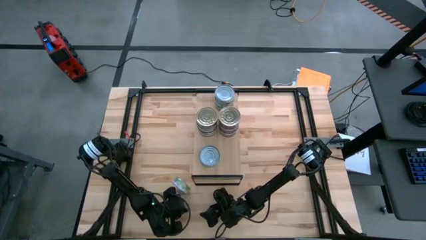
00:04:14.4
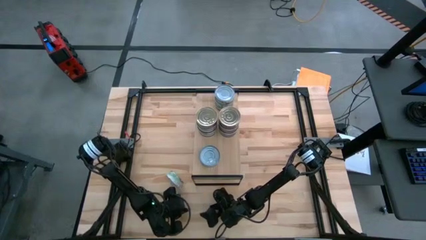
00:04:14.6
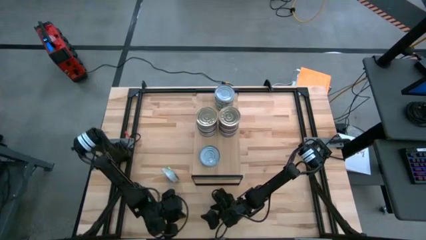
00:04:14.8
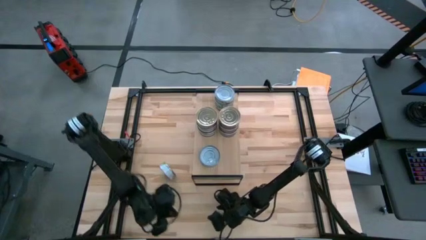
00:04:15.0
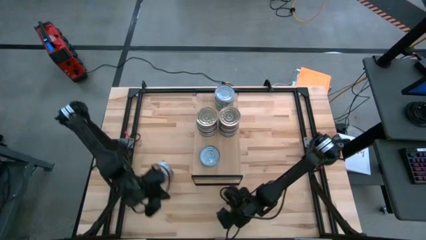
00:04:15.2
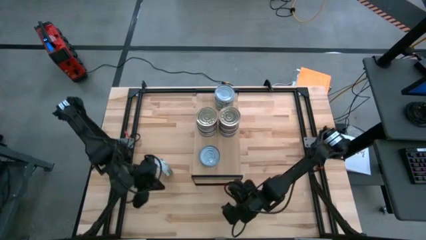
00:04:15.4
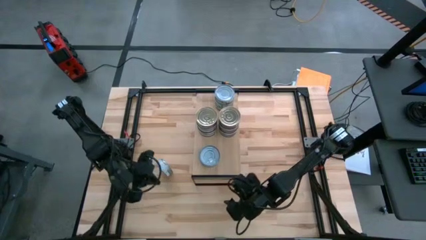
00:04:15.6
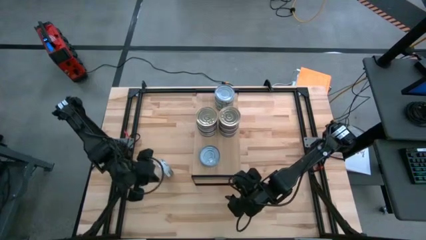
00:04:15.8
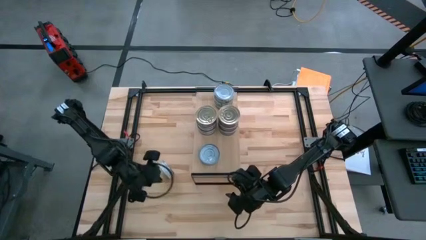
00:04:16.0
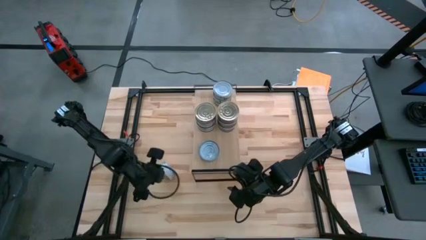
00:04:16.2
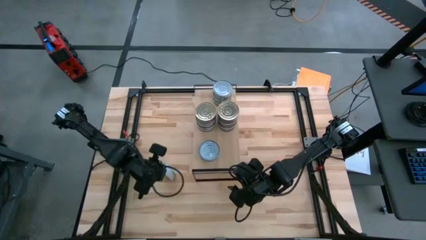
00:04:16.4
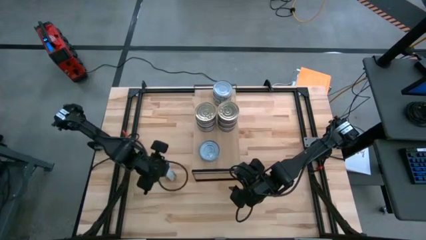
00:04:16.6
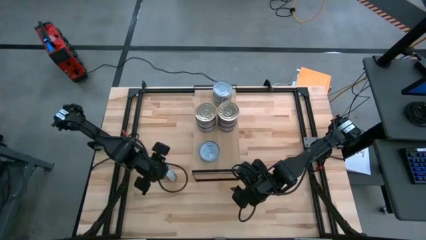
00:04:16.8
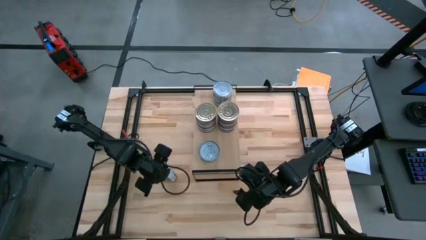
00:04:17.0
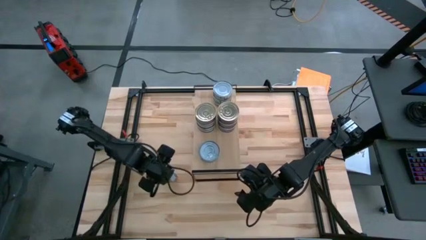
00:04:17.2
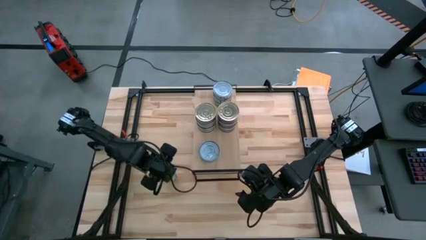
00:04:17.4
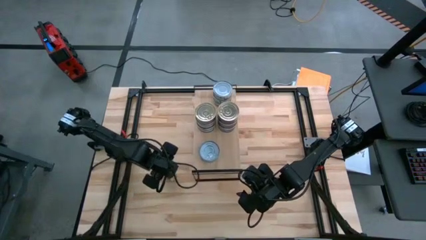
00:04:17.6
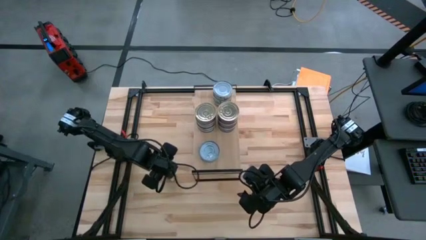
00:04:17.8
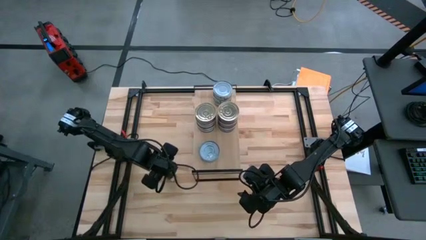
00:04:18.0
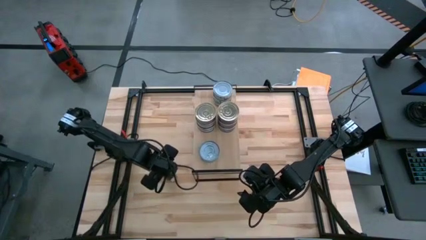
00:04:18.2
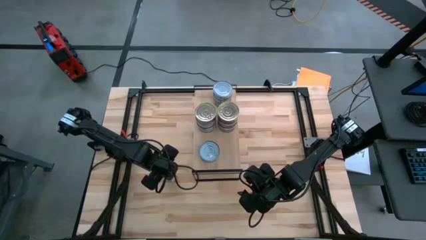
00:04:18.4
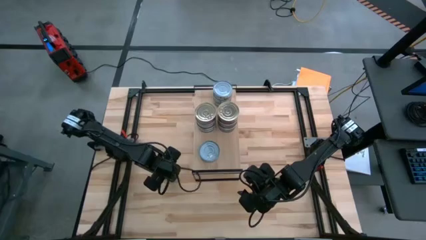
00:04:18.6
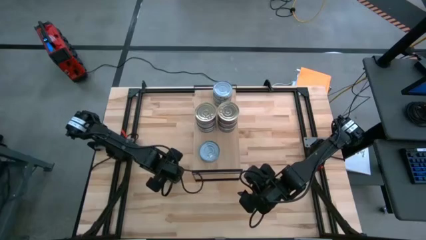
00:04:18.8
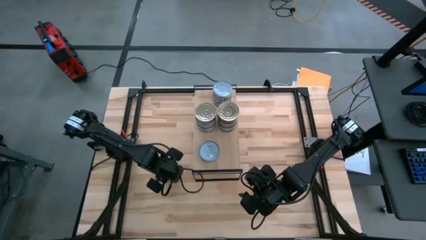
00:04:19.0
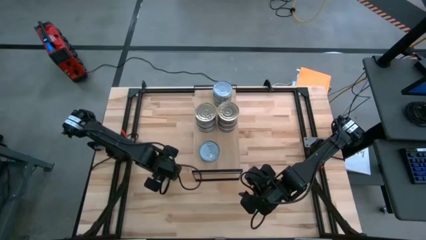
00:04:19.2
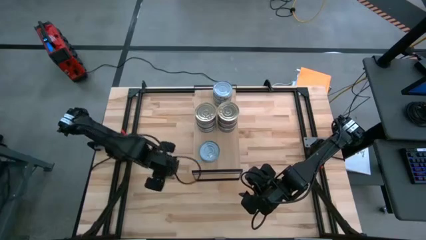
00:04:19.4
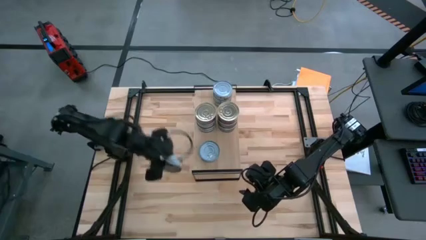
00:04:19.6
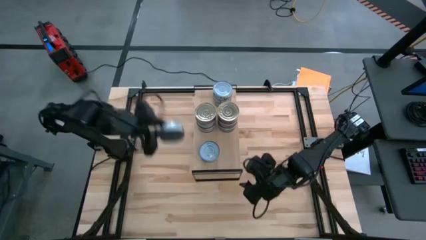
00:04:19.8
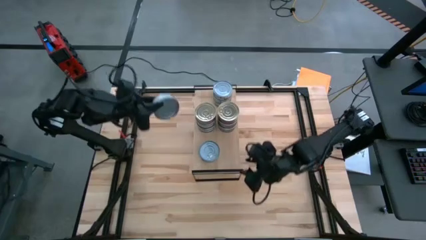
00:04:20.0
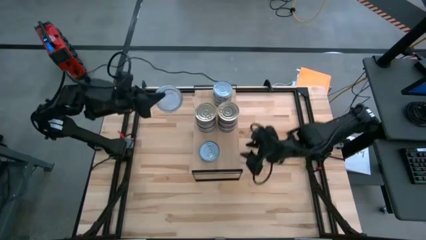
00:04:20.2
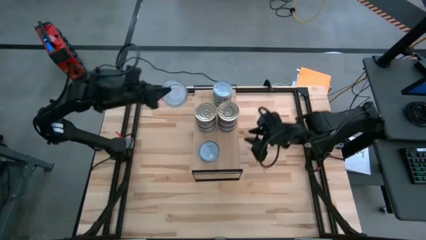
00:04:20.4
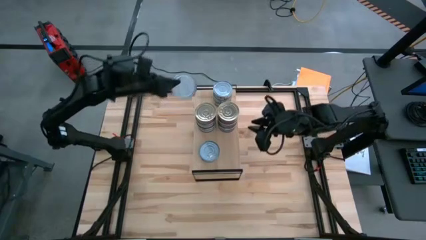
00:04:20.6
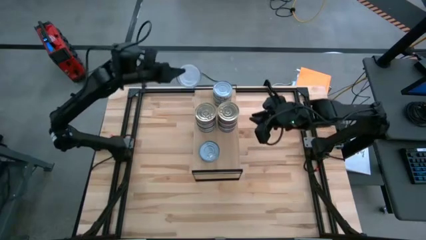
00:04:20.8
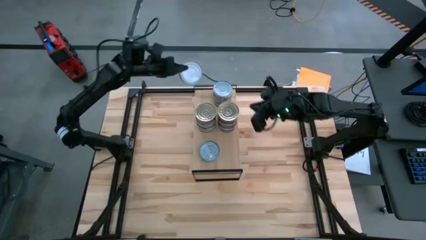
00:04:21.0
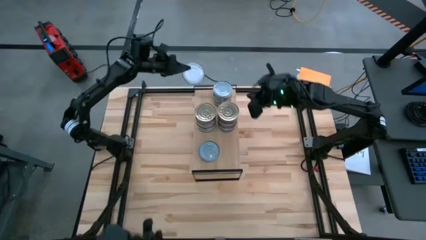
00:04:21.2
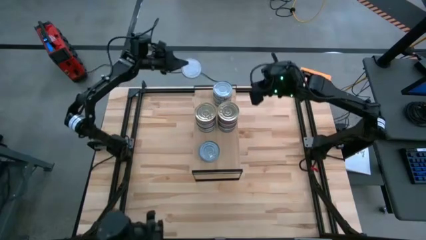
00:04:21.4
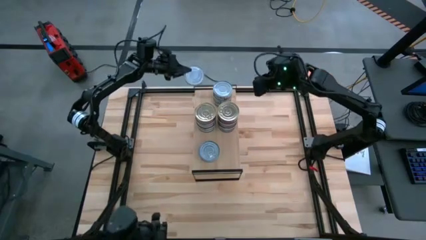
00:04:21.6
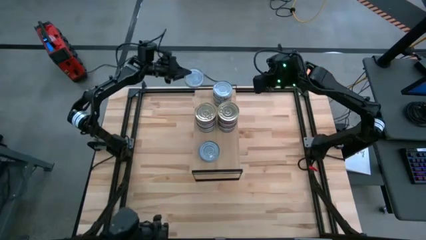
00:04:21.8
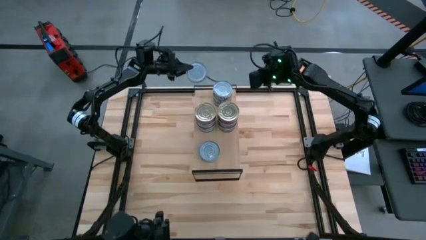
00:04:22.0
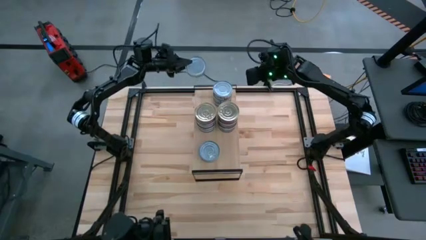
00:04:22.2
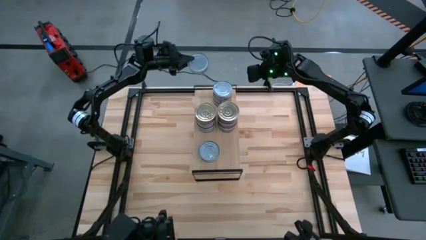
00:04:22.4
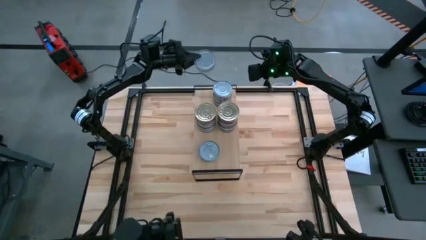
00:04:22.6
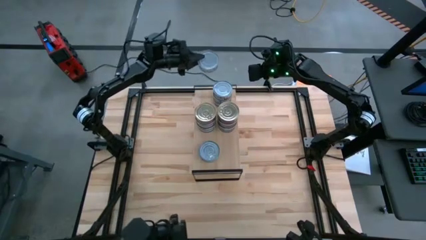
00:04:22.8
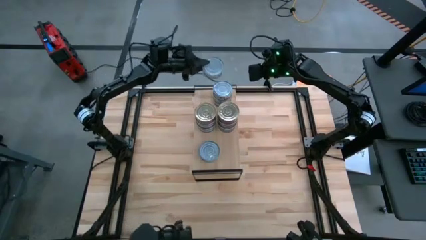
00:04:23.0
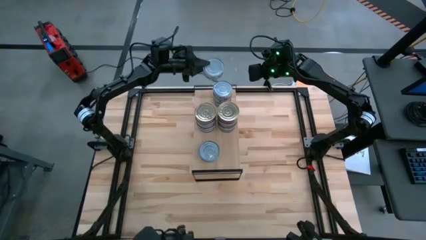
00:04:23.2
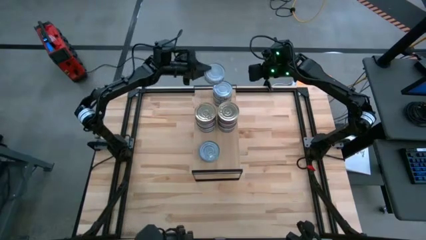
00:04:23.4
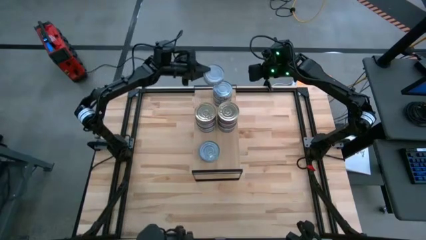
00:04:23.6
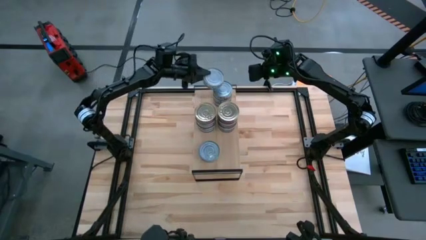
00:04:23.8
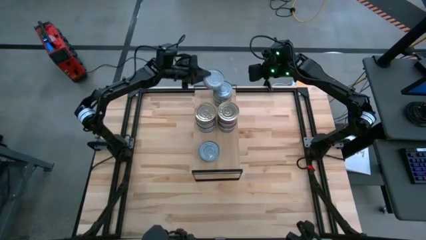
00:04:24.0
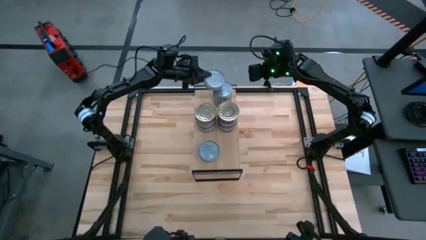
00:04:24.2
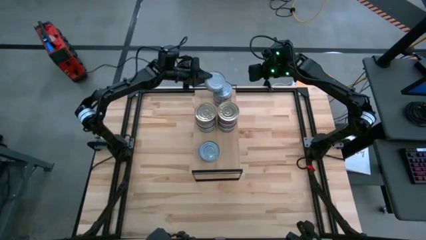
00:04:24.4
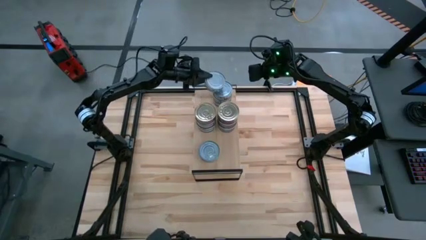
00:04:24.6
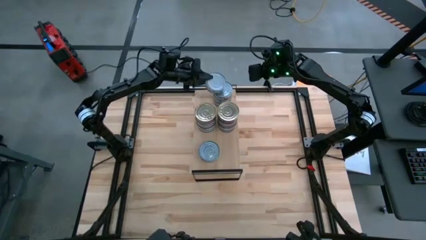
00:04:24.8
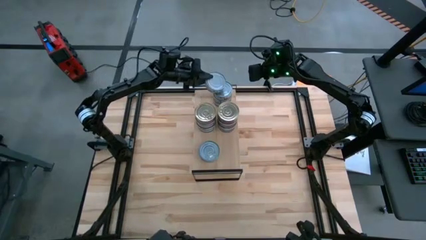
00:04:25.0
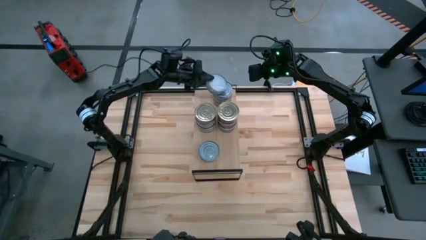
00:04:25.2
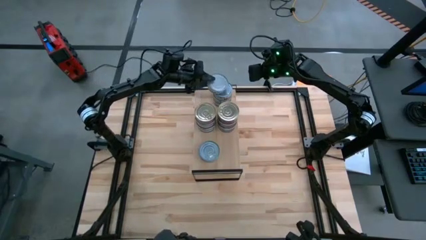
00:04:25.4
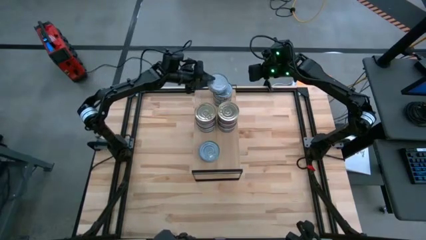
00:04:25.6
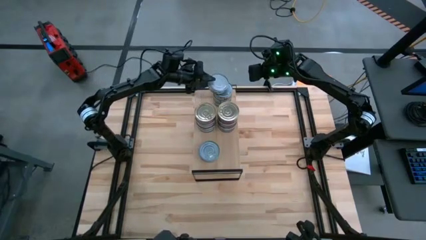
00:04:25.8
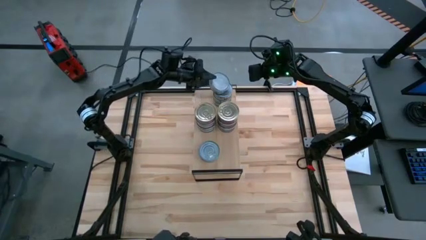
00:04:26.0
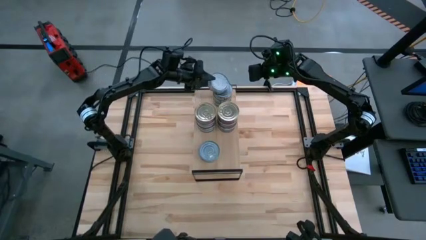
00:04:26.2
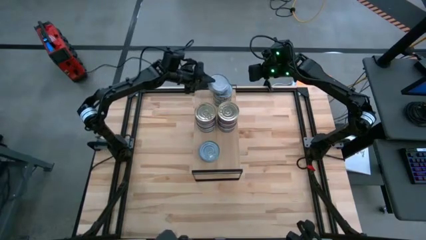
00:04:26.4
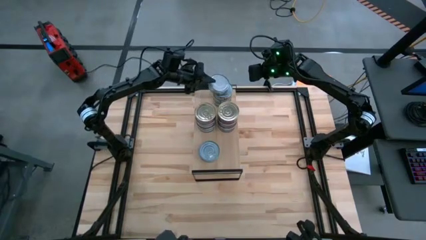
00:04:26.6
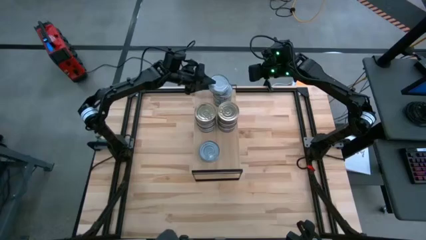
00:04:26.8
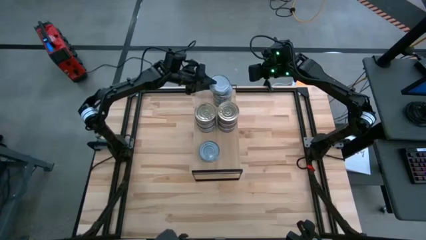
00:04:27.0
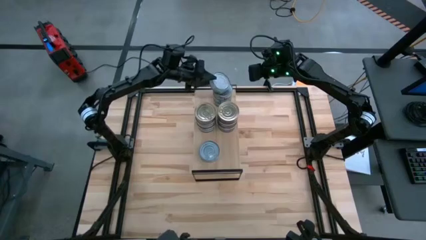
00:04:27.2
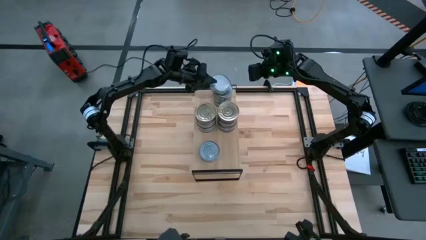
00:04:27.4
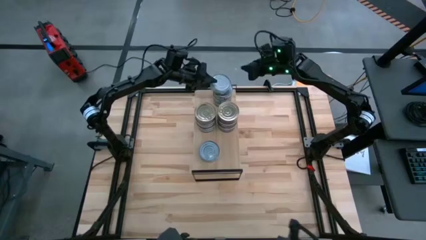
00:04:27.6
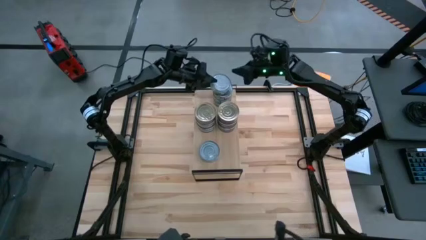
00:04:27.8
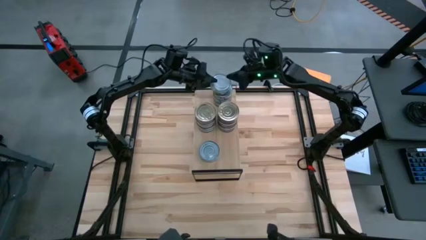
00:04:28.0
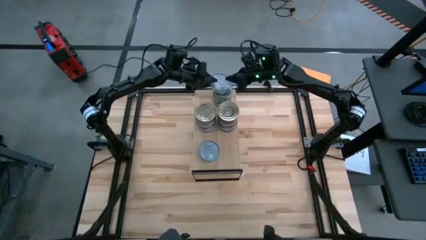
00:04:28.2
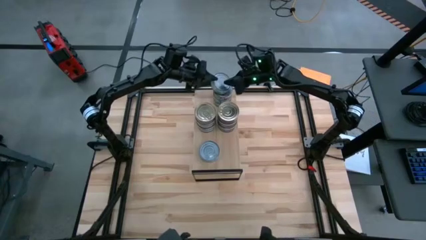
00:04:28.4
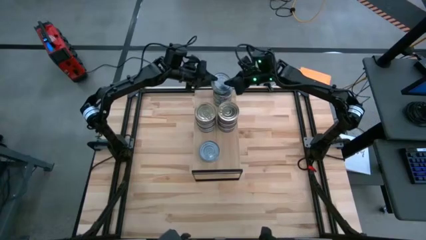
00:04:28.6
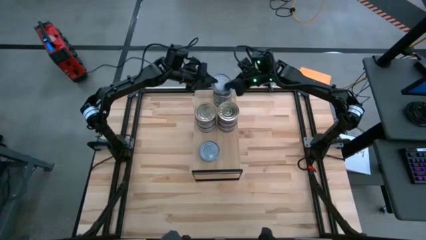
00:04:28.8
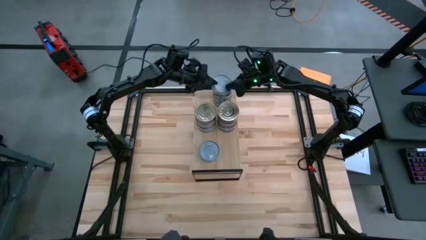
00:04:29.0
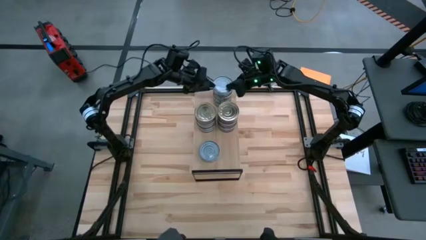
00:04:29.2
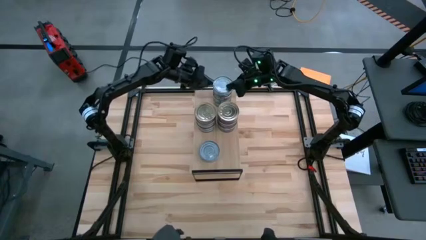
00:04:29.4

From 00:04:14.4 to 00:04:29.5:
Task: Stack canned seafood by type on shelf
Stack the green tuna can on top of the green tuna can on the shelf
